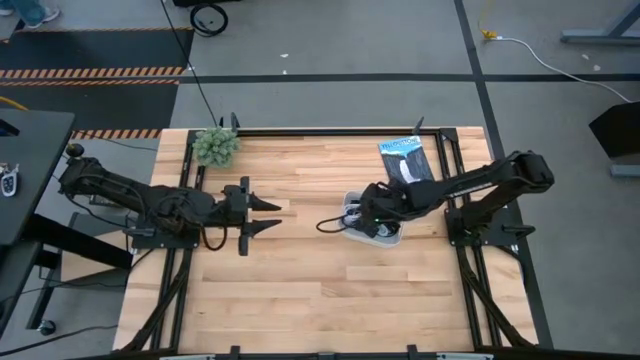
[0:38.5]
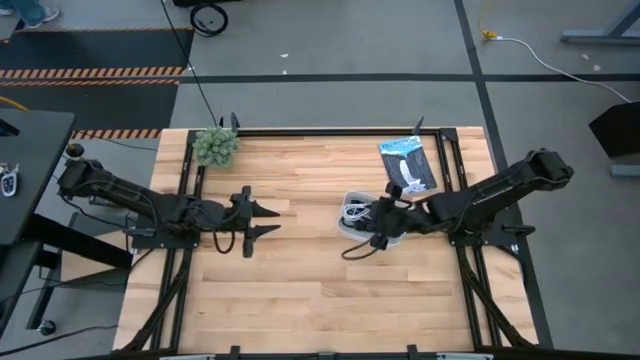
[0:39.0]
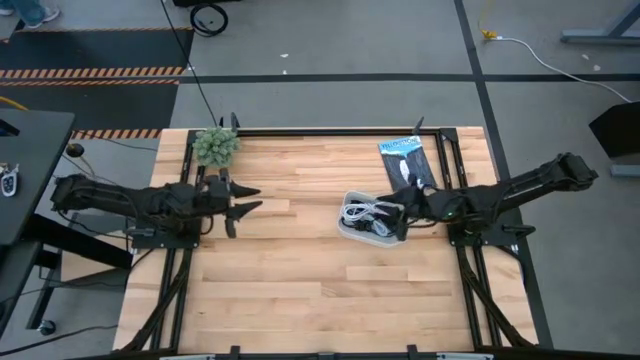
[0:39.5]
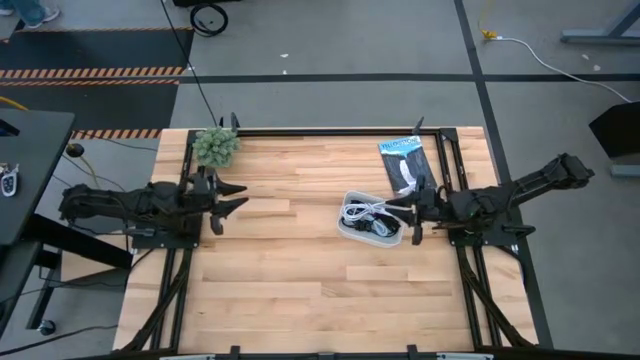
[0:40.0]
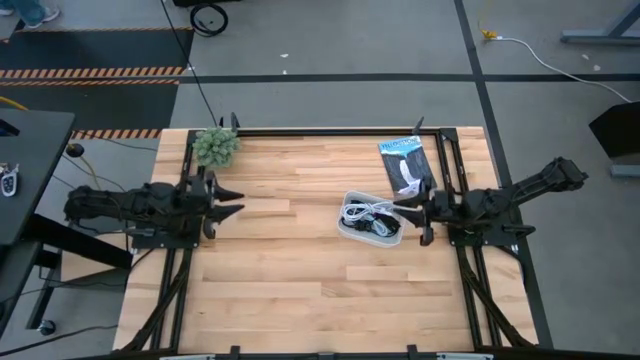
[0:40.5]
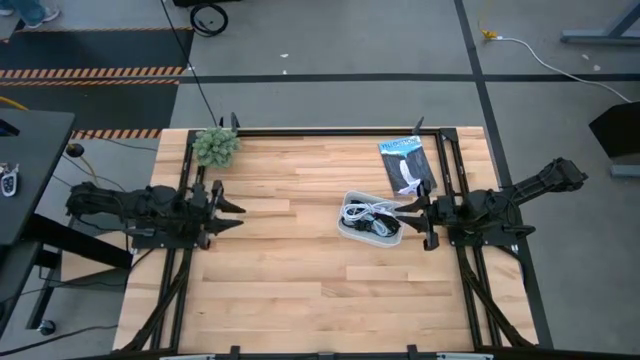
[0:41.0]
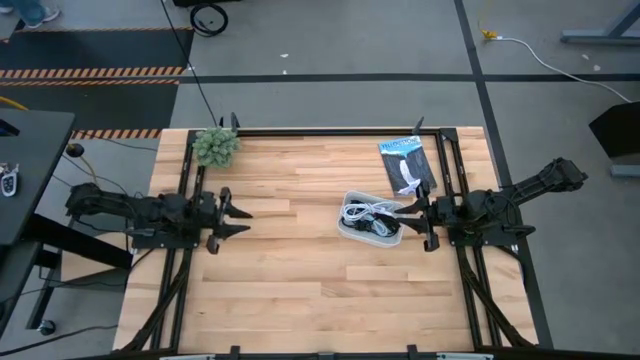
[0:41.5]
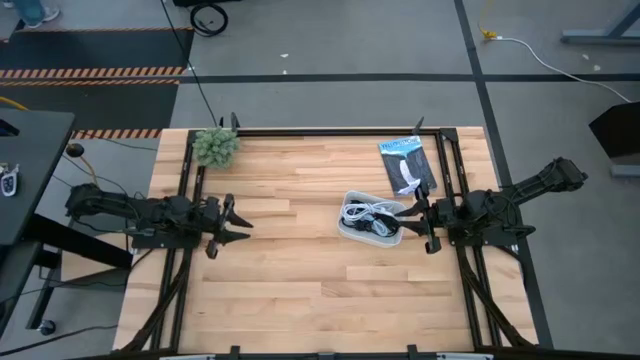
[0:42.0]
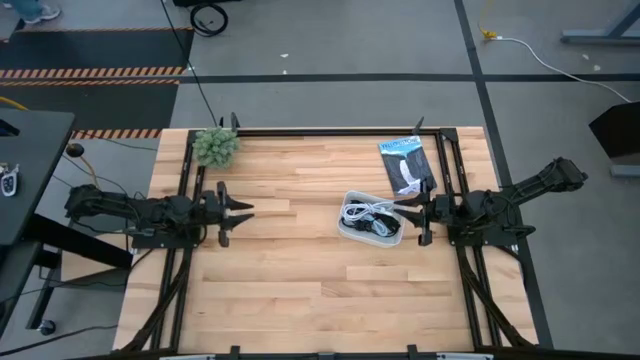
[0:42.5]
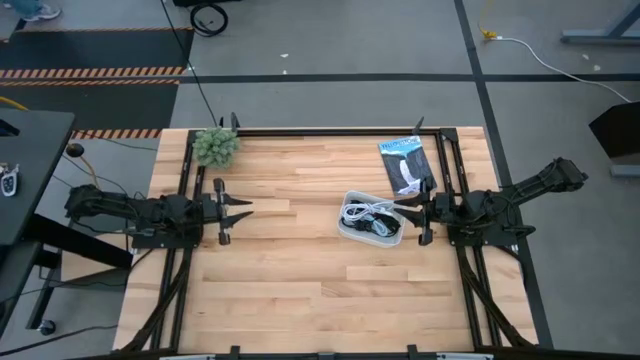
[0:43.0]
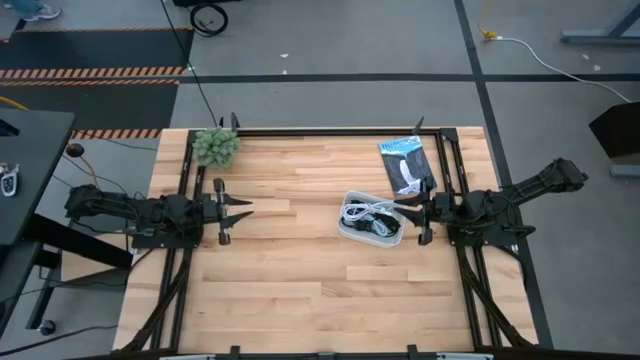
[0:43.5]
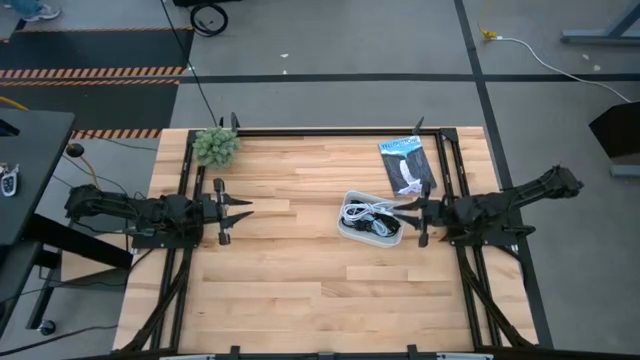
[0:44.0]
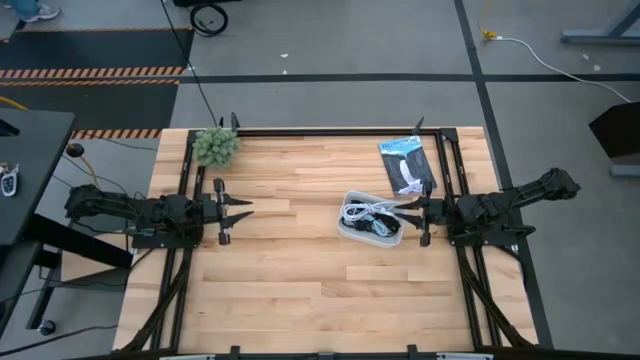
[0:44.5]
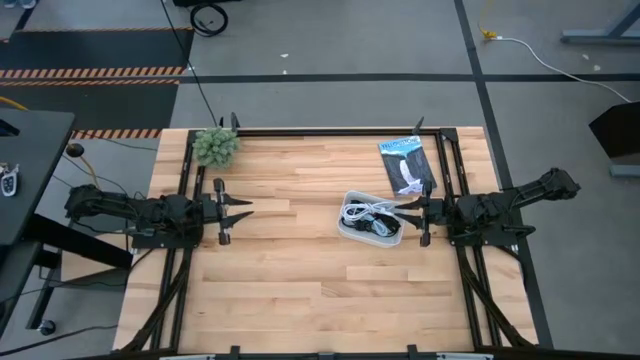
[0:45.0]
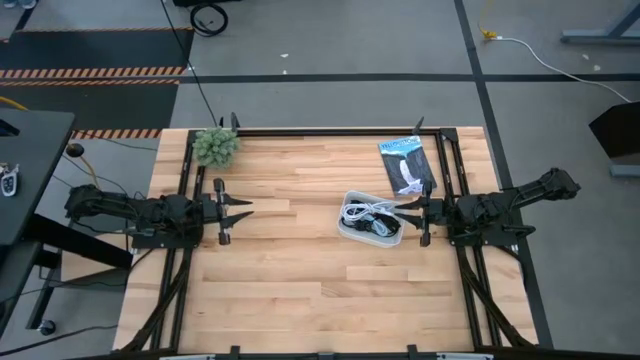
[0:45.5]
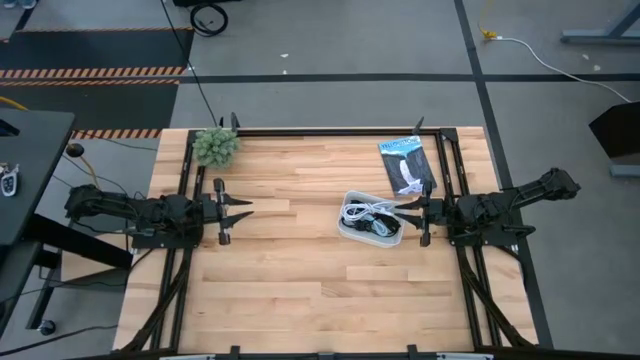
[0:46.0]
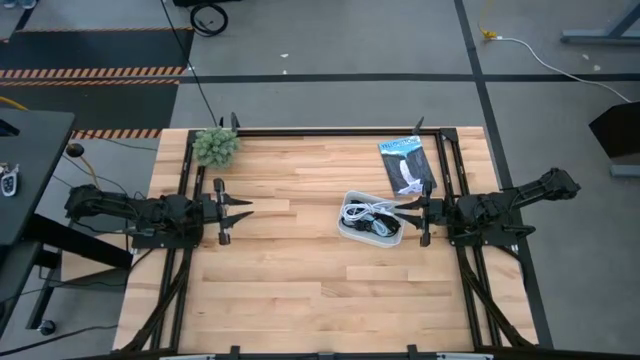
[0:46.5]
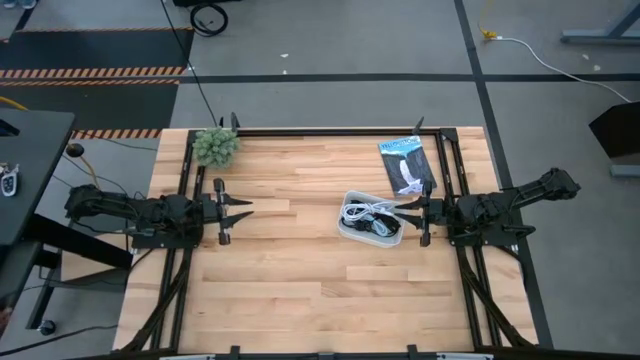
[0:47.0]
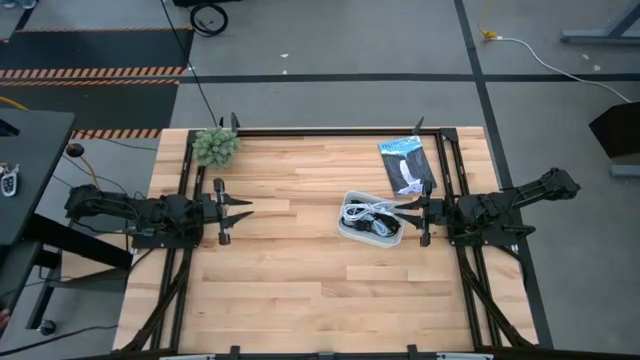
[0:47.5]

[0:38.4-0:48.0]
Task: Pick and place USB-C Cables
Return to home position

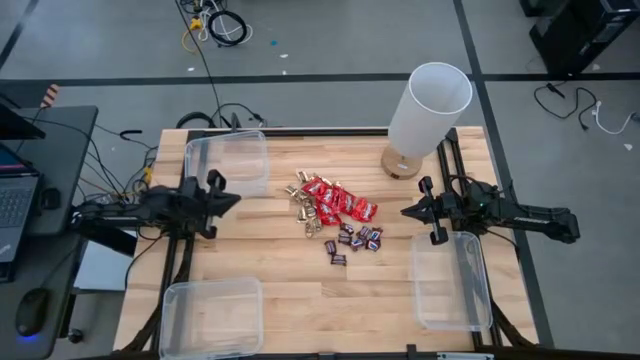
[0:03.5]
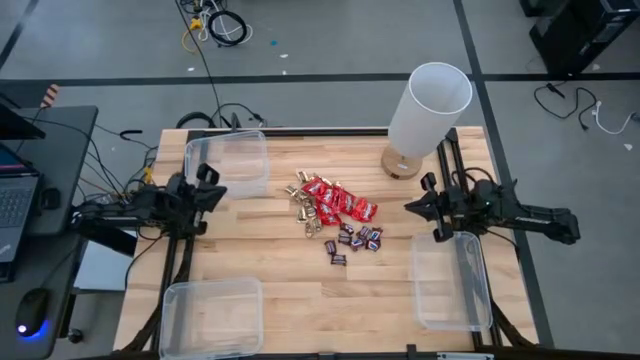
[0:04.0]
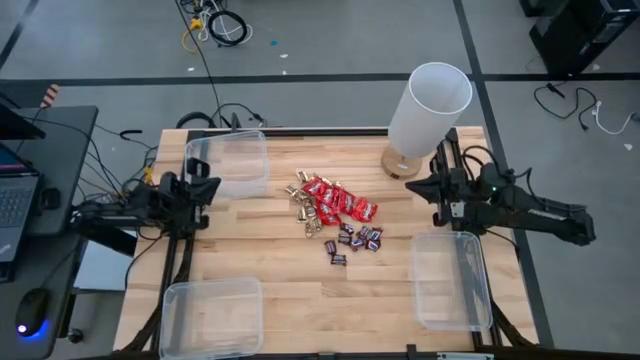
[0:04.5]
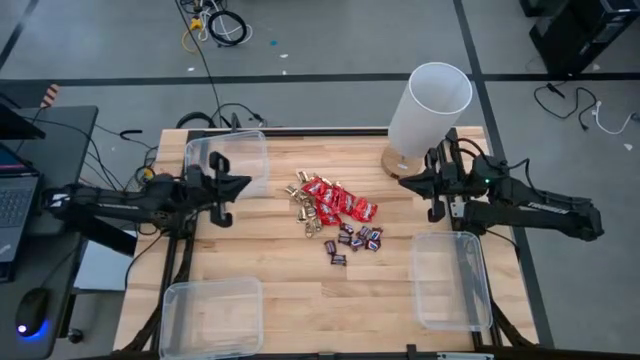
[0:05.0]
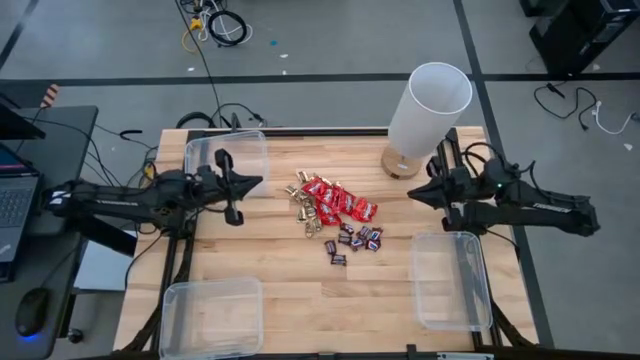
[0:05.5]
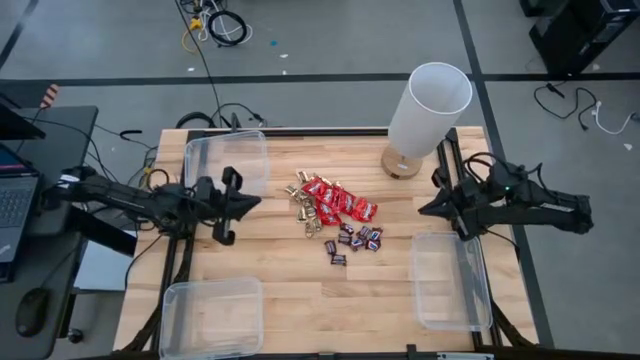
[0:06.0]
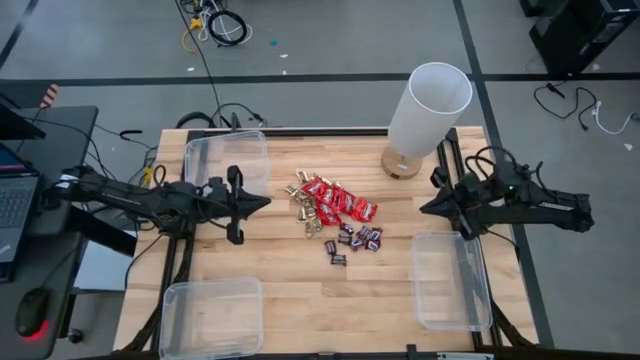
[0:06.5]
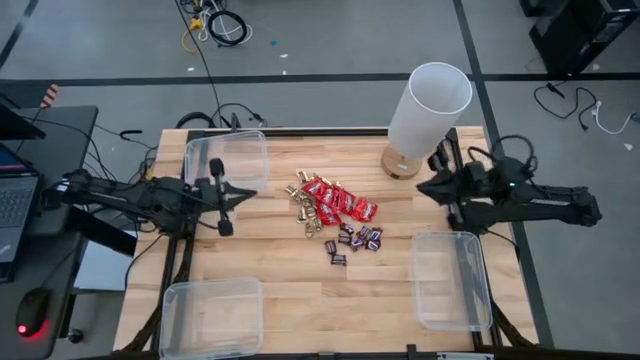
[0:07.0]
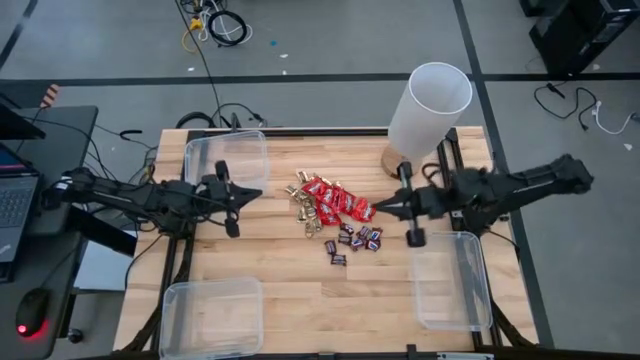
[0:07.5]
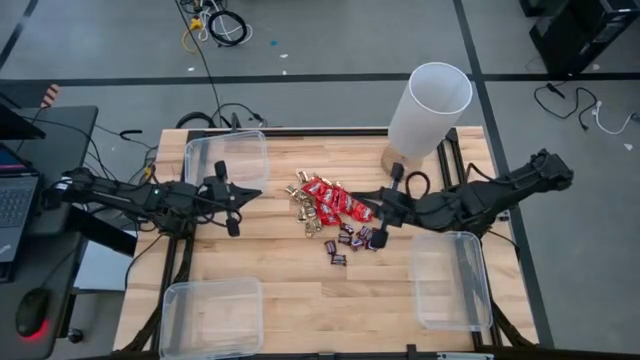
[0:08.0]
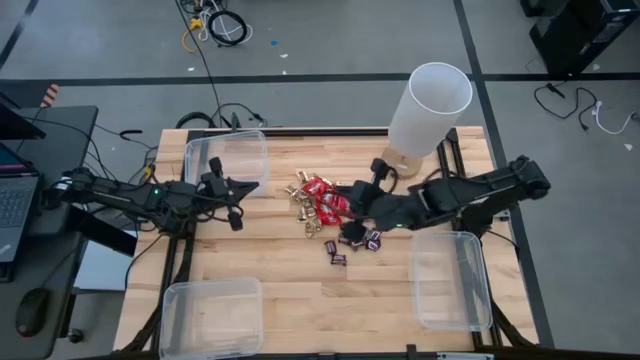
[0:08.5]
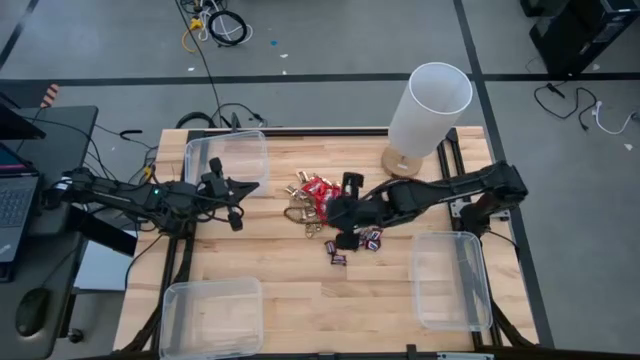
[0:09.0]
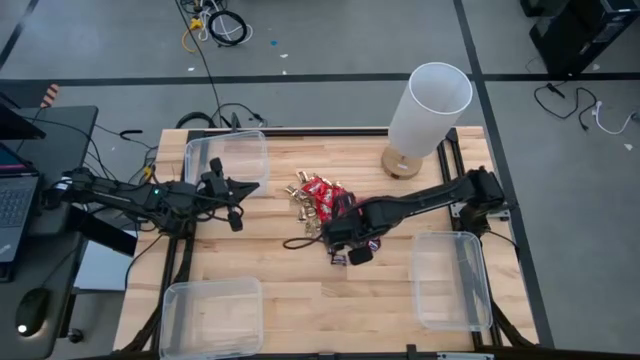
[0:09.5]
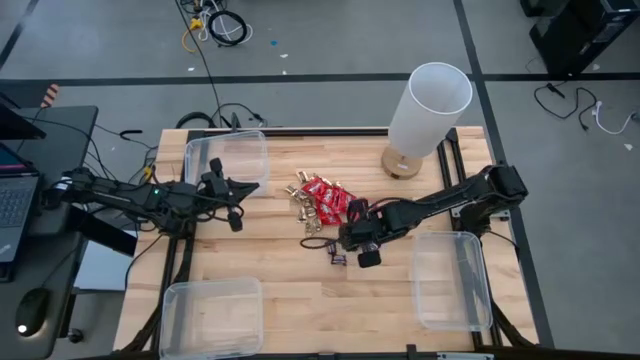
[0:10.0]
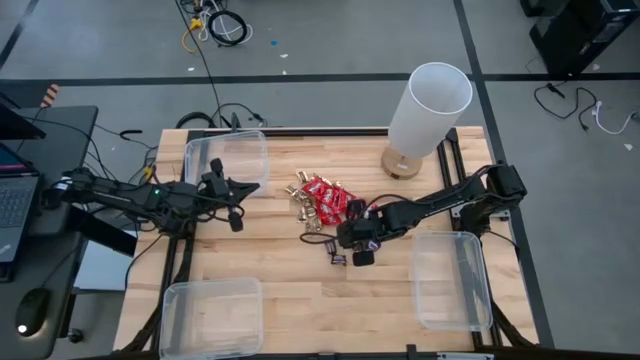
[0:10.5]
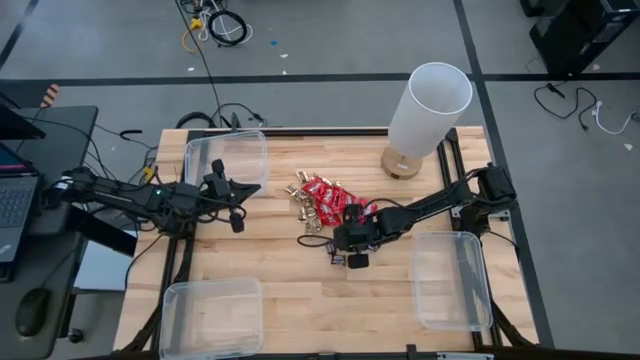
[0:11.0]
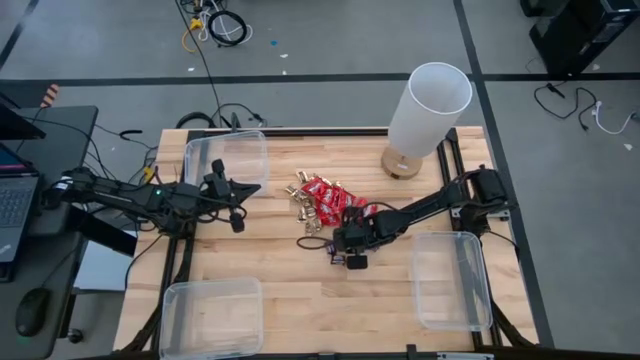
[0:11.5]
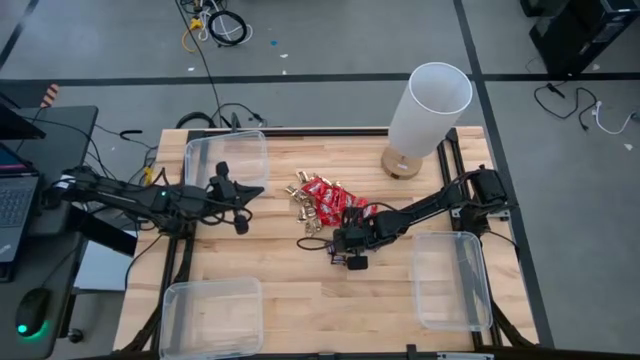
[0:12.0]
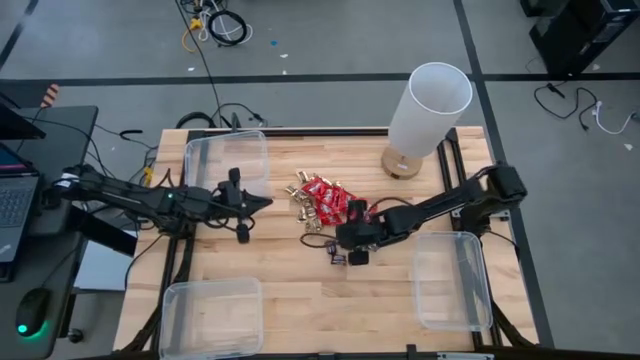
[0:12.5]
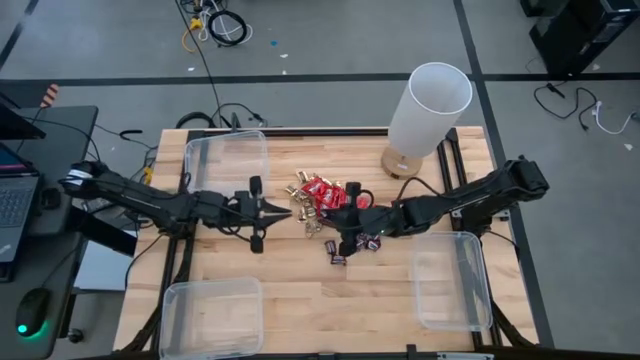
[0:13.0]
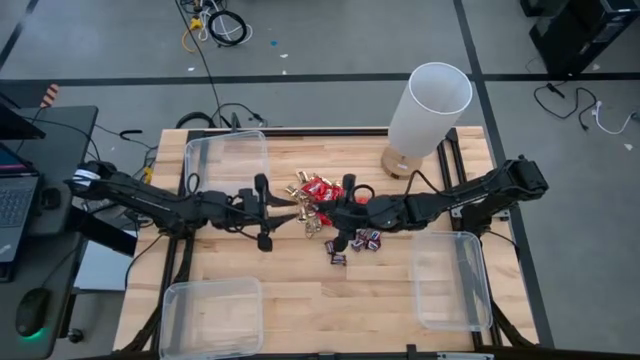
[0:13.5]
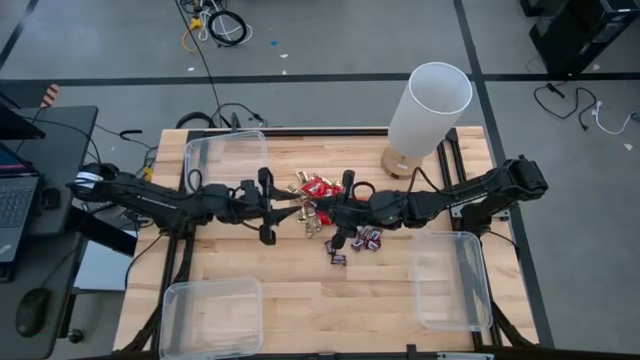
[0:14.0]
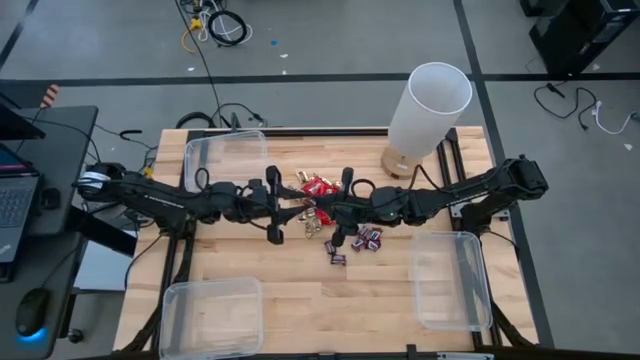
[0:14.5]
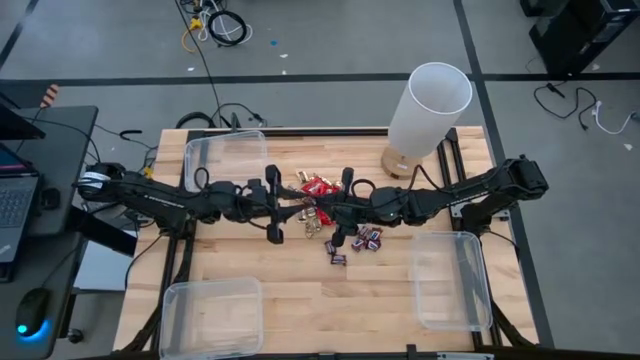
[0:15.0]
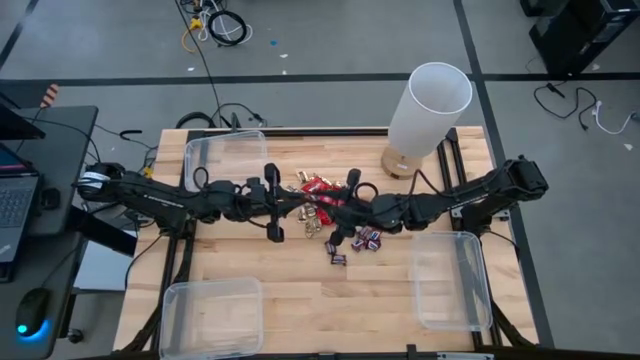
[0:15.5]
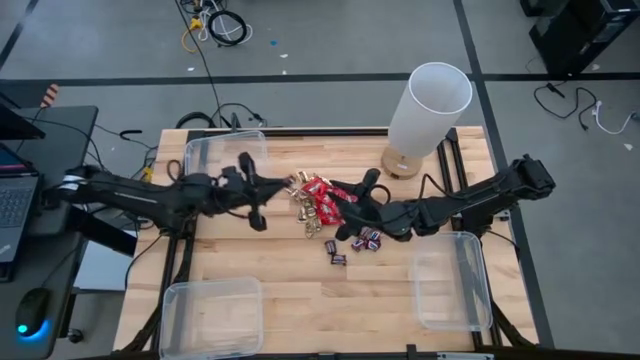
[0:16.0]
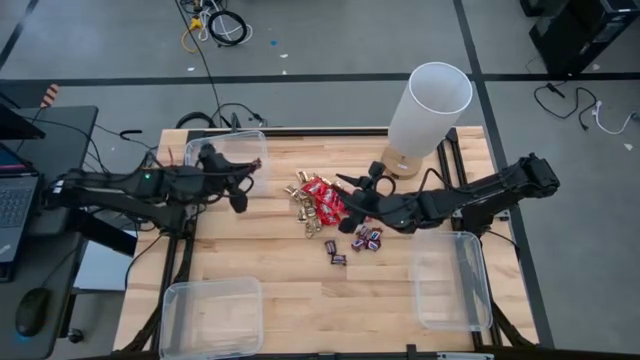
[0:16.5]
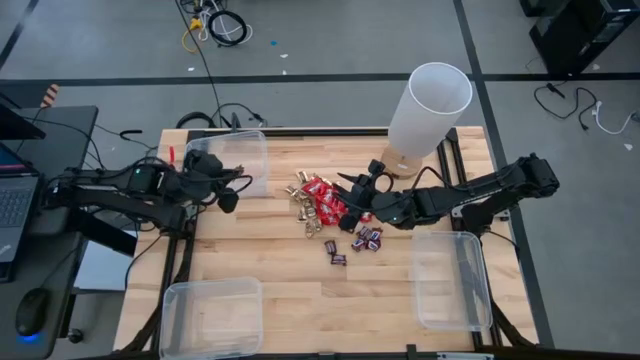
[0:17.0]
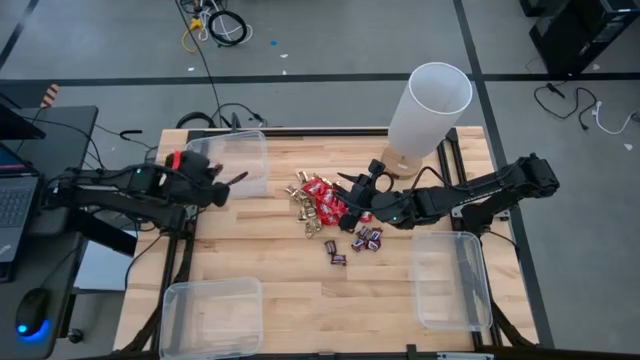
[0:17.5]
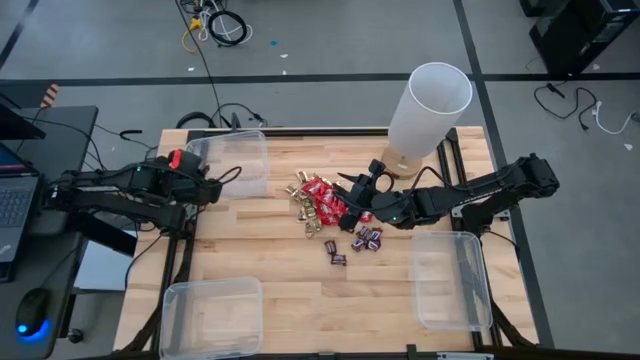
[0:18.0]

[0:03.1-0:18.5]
Task: Sort candy
Put the brown chocolate into the top left transparent bin
